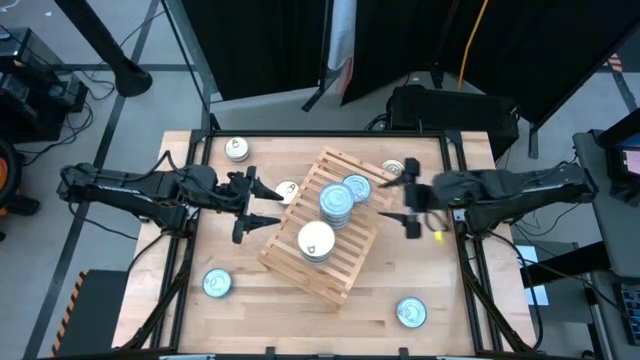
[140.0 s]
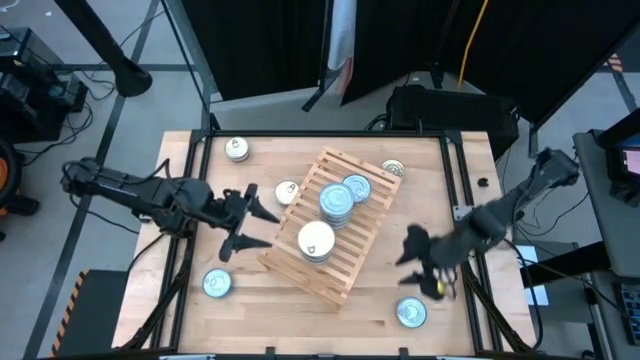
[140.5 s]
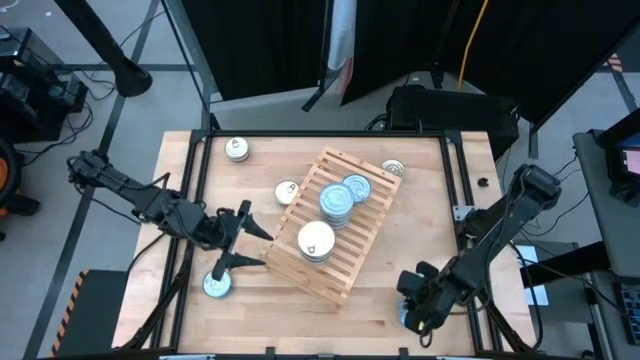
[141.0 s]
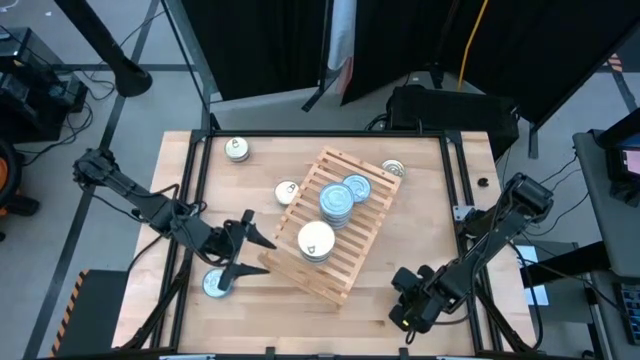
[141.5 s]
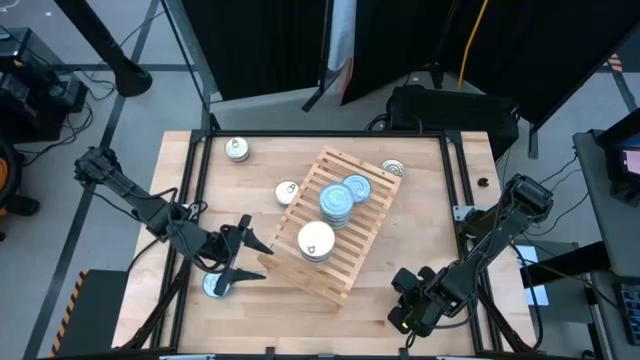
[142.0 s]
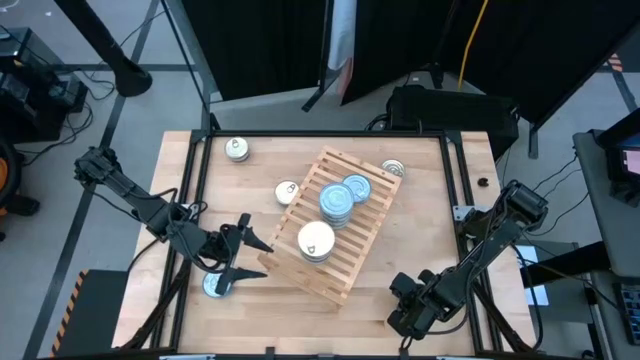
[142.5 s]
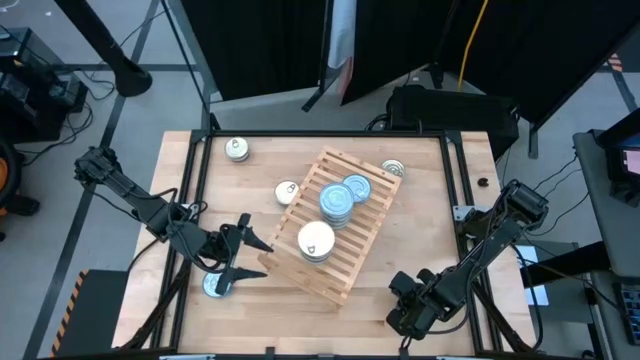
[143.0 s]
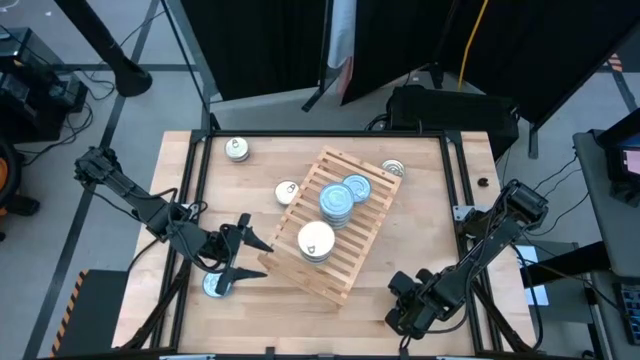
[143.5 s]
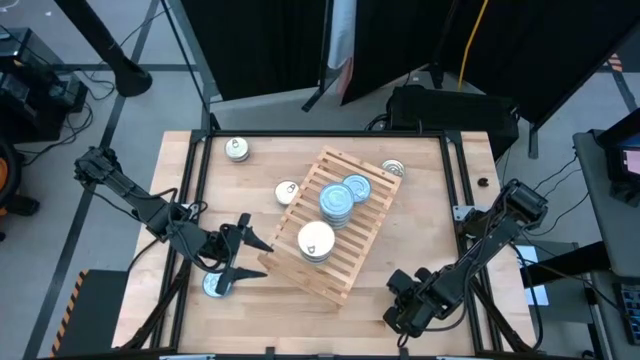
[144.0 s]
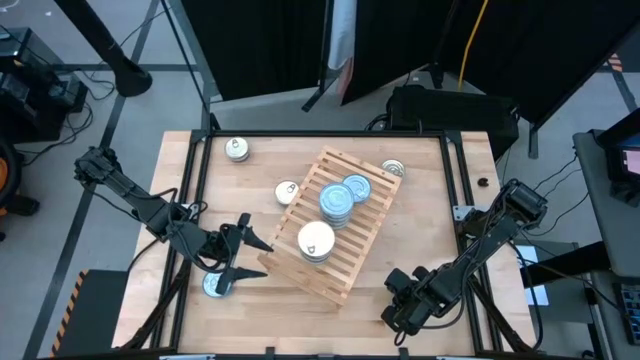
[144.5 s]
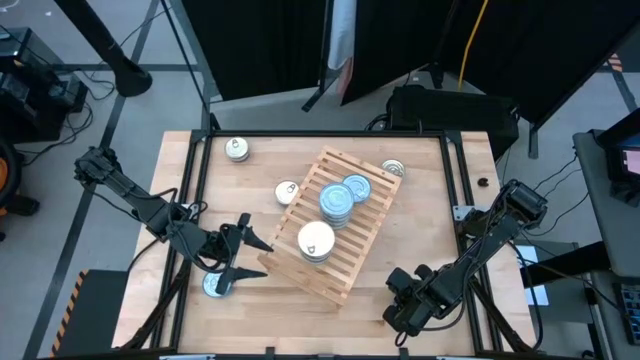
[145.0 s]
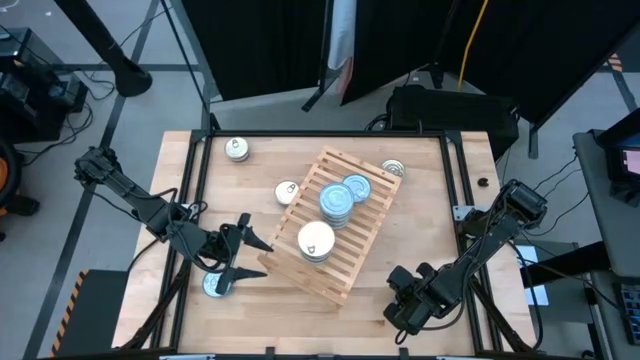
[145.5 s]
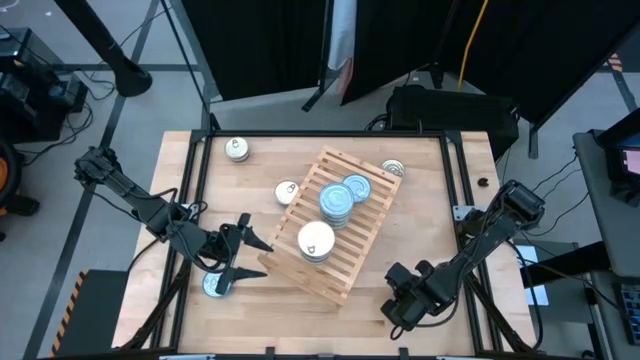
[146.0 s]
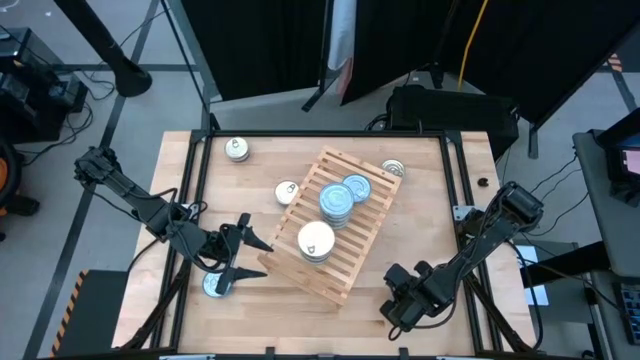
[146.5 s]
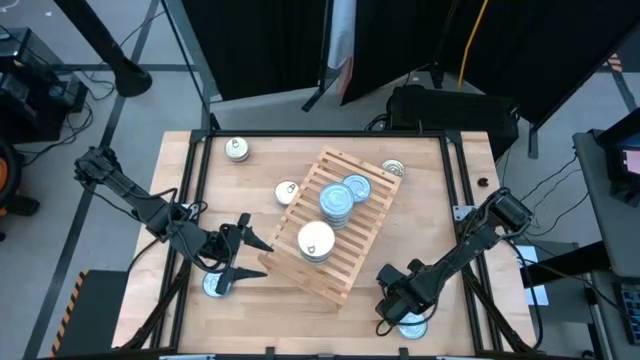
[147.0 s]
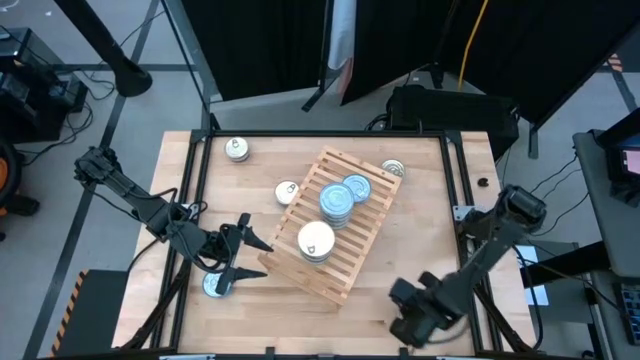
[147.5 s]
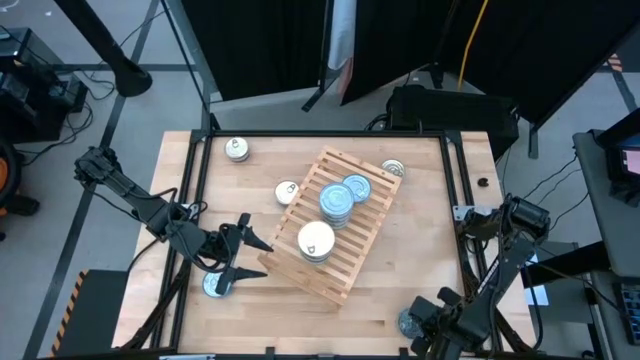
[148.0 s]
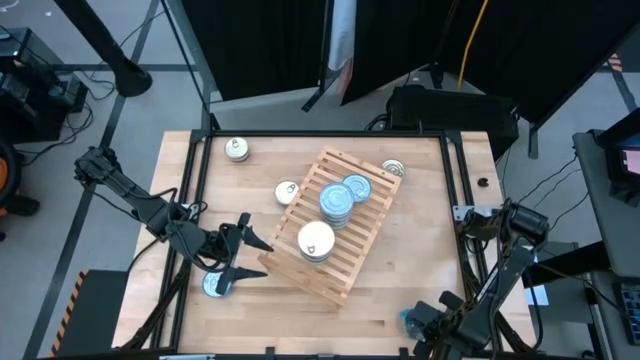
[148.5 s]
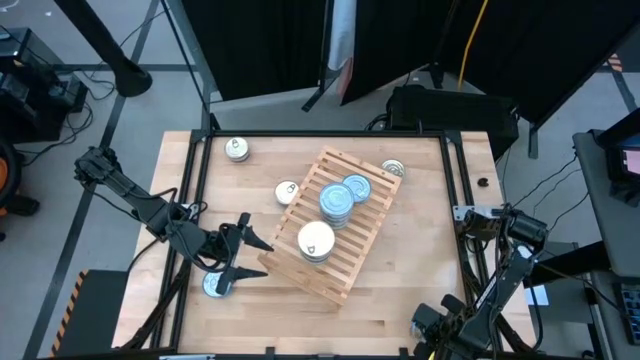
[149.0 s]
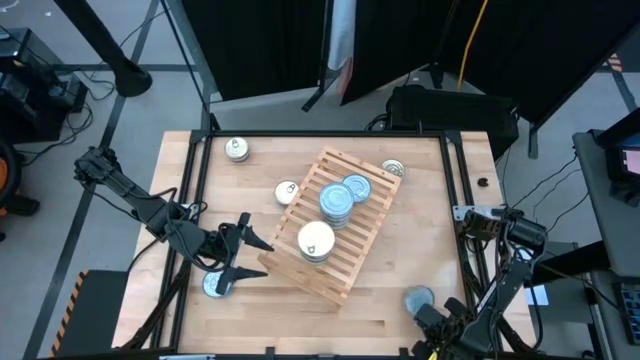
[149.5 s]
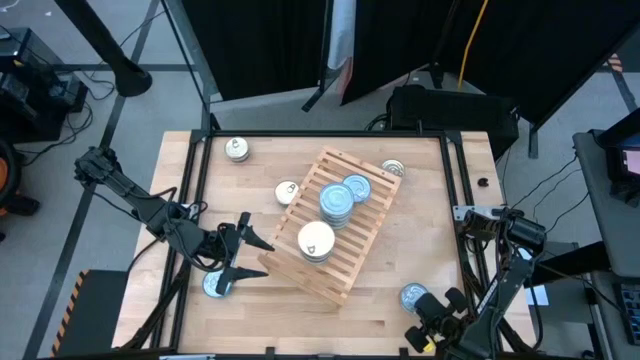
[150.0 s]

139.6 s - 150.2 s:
Task: Stack canned seafood by type on shelf
Stack the yellow-blue tuna can on top of the other yellow-blue tuna can on the shelf

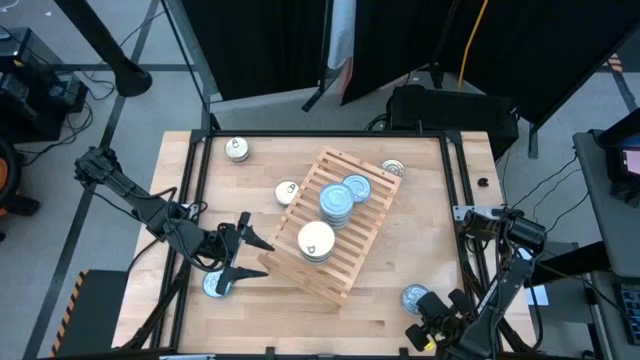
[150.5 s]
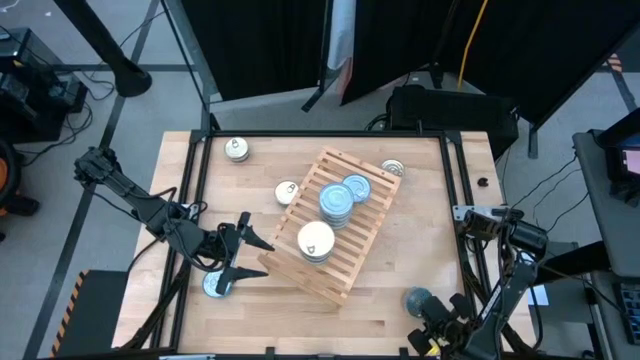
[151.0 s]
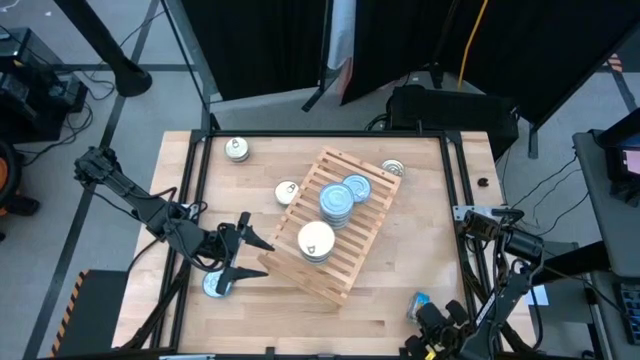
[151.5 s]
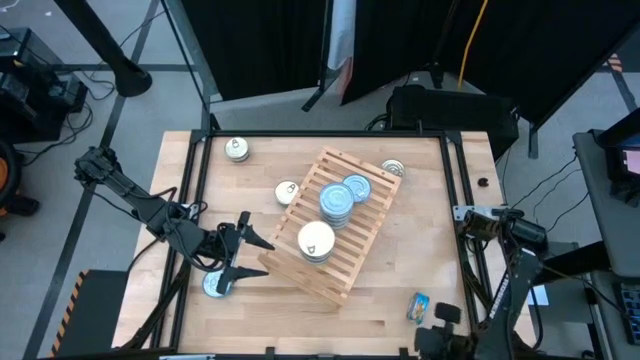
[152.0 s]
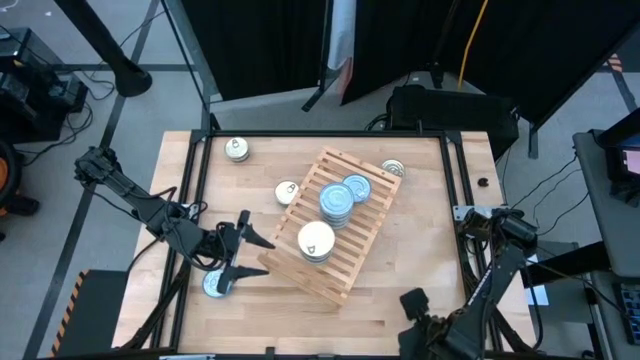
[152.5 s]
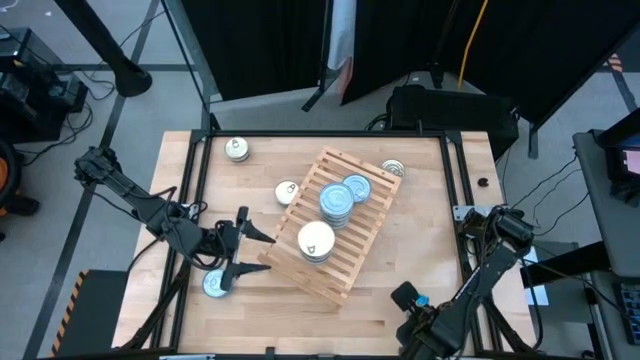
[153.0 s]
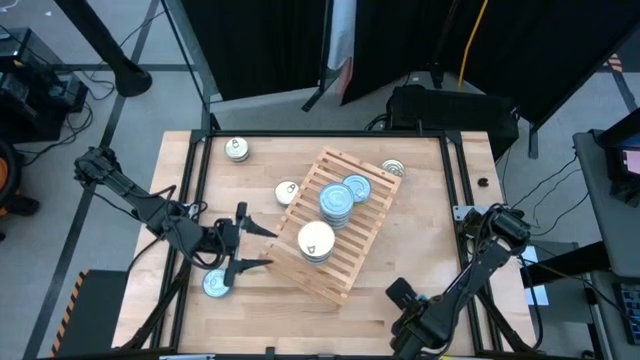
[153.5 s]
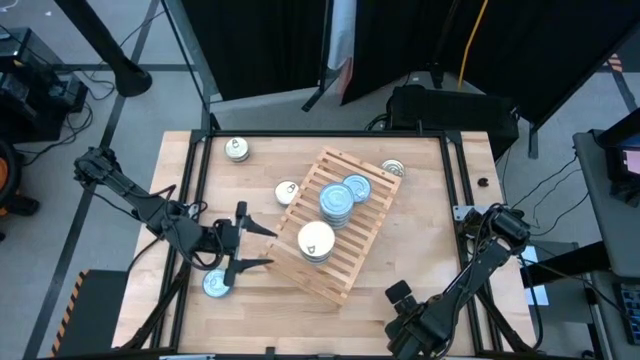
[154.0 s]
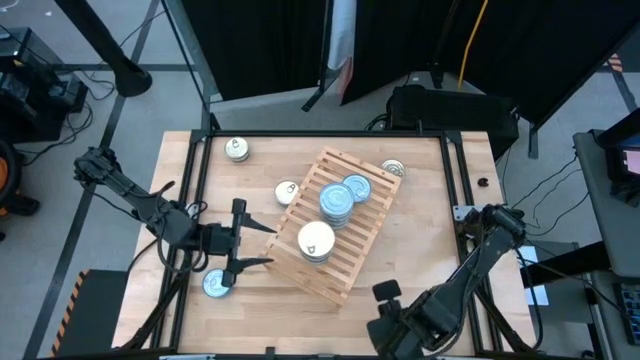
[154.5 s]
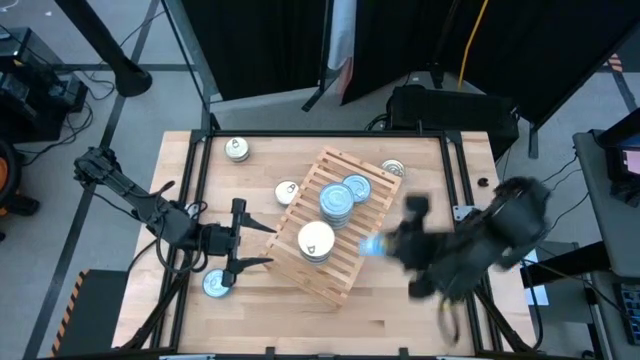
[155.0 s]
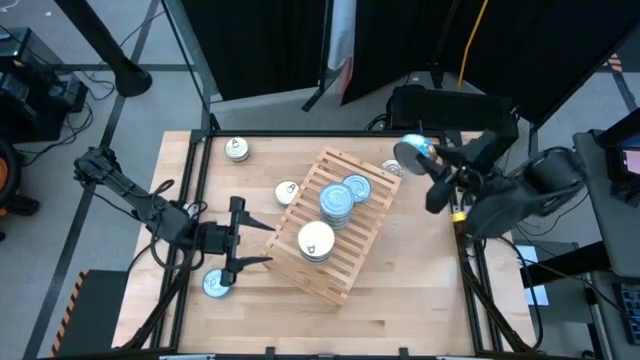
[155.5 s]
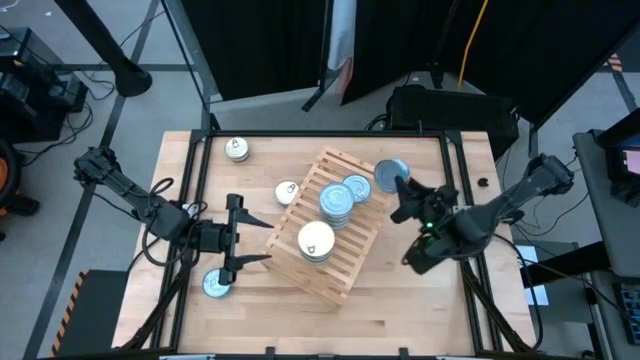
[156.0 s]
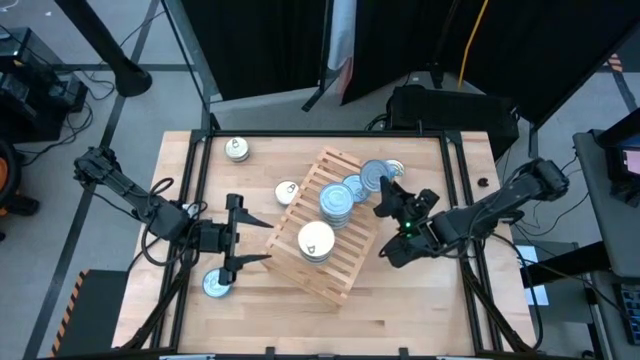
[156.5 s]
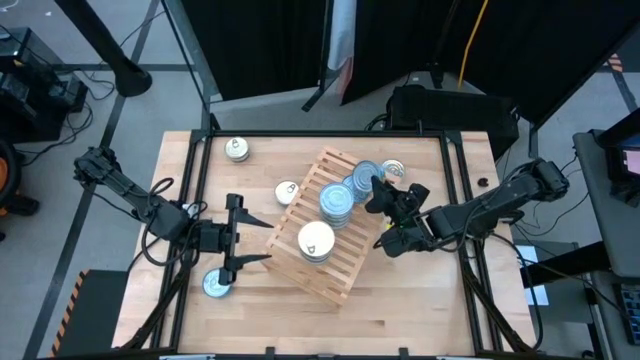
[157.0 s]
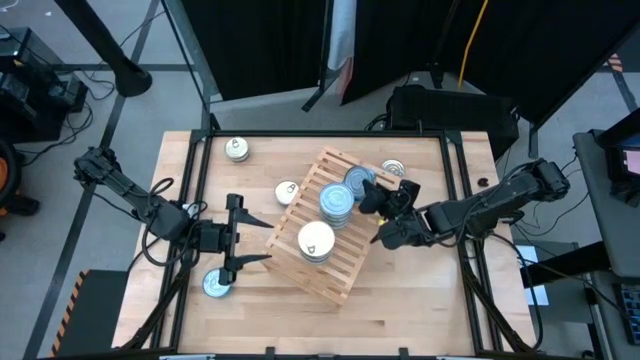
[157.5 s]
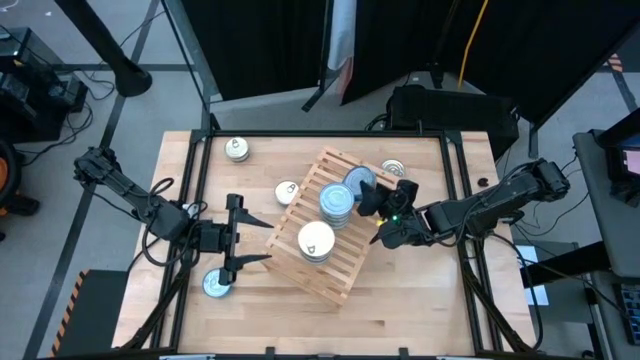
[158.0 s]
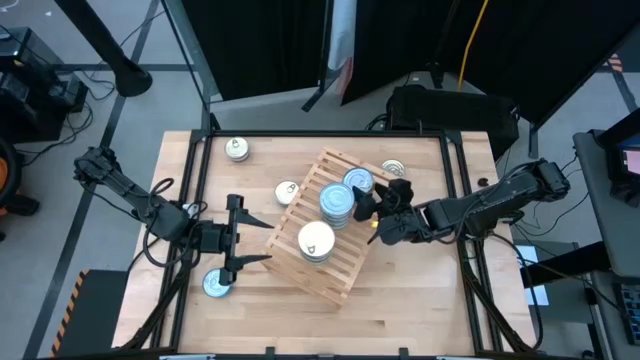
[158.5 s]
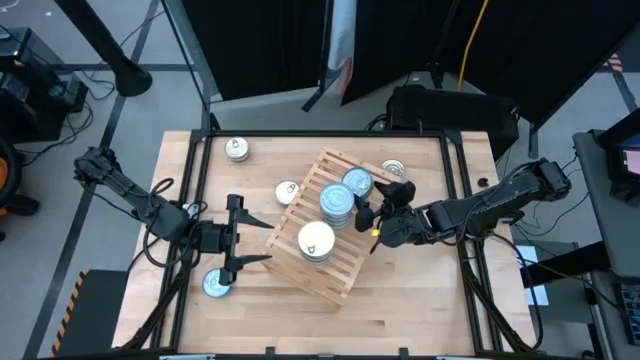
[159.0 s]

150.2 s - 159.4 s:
Stack the yellow-blue tuna can on top of the other yellow-blue tuna can on the shelf

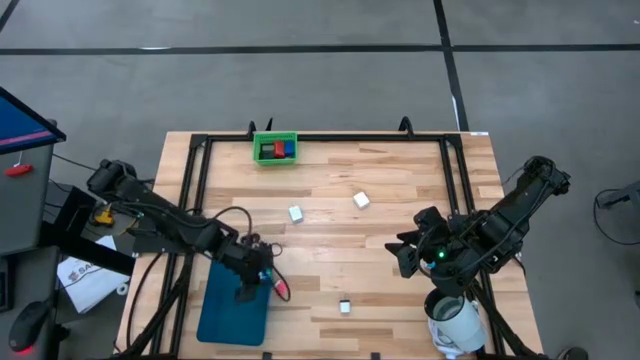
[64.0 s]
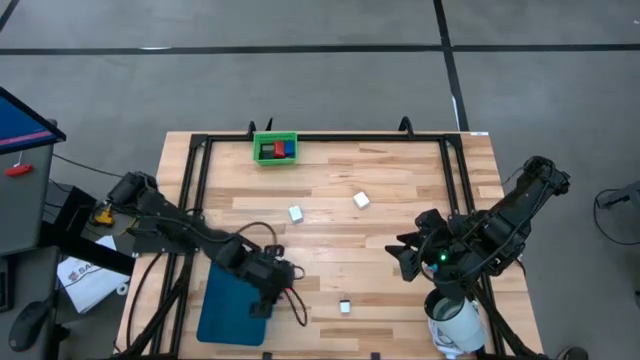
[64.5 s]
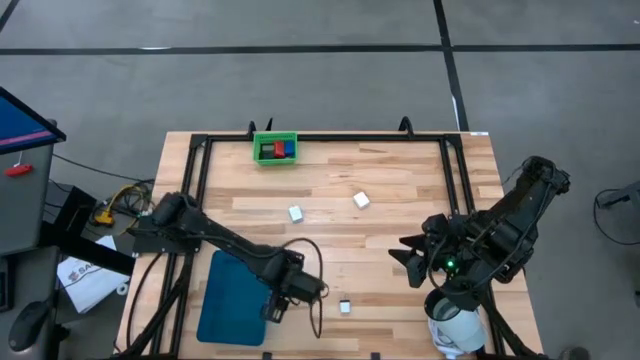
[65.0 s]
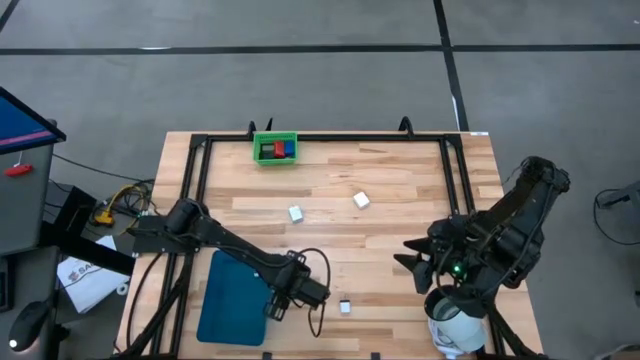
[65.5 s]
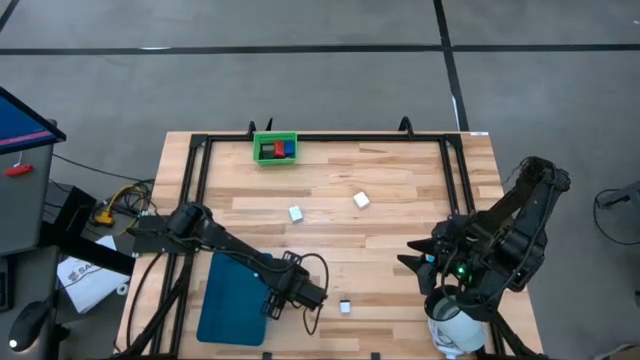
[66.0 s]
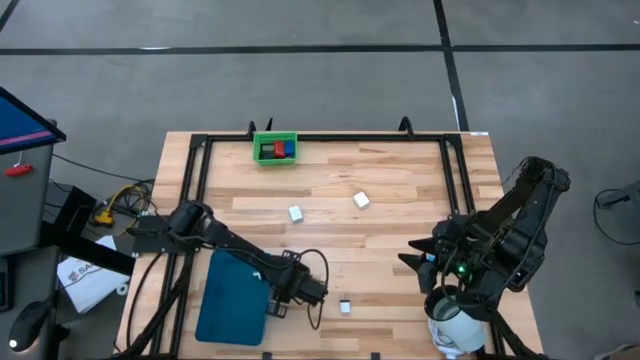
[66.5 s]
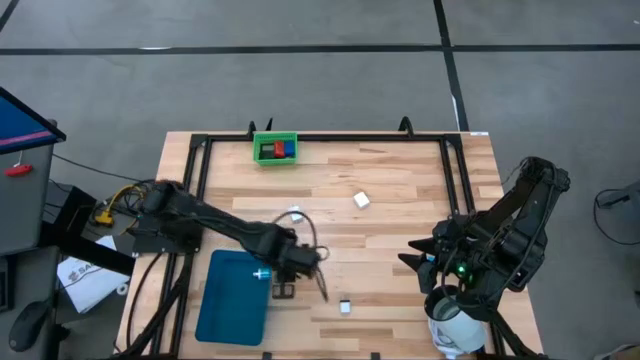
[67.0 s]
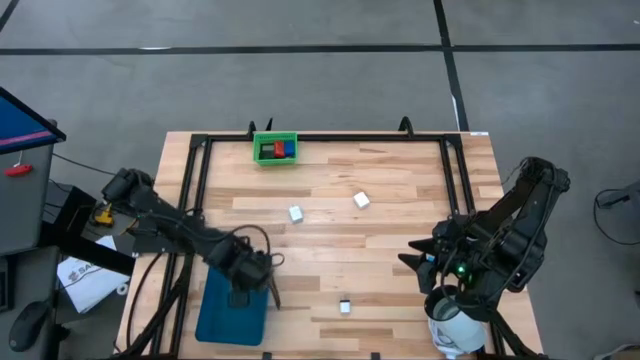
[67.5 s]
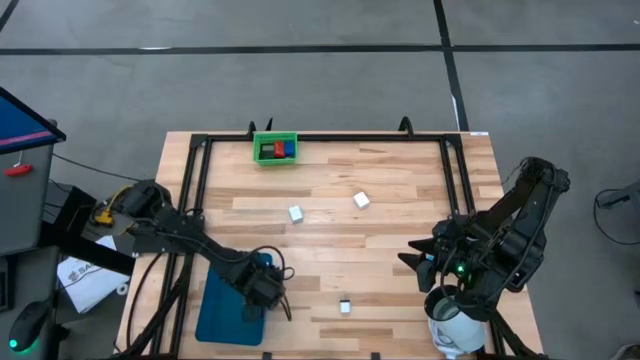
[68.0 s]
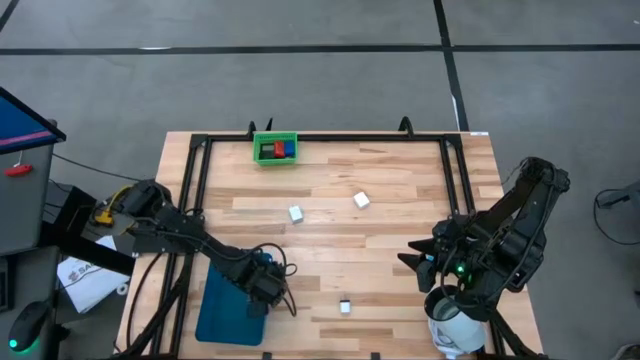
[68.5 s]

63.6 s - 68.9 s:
Task: Pick & Place Office items
Put the pink charger adapter into the blue bin
